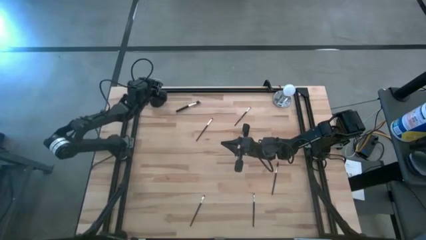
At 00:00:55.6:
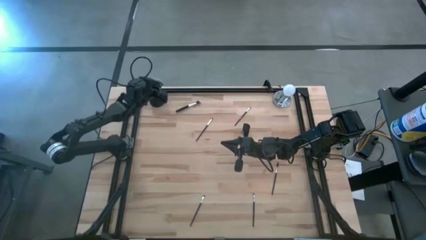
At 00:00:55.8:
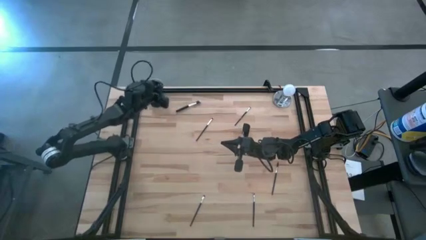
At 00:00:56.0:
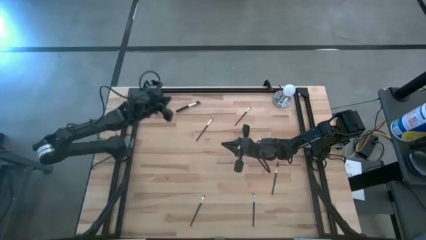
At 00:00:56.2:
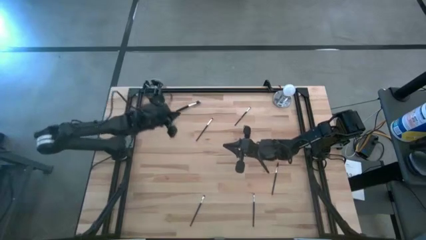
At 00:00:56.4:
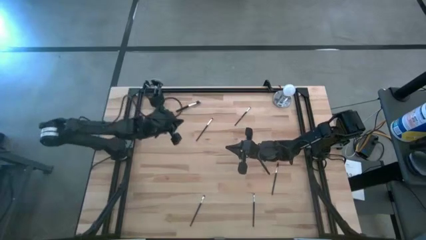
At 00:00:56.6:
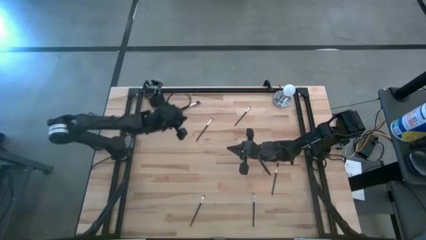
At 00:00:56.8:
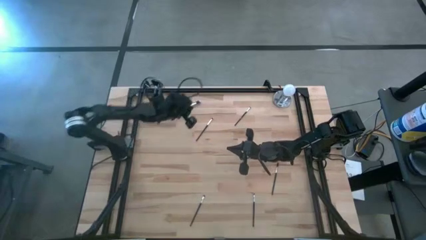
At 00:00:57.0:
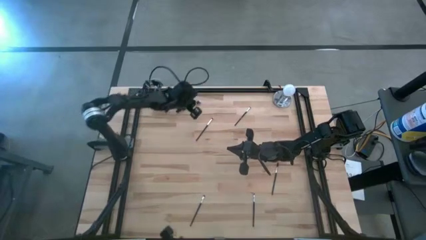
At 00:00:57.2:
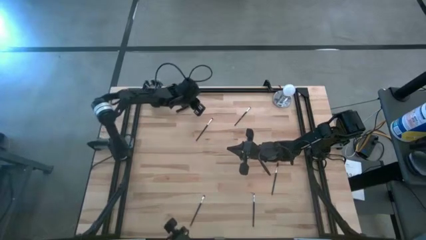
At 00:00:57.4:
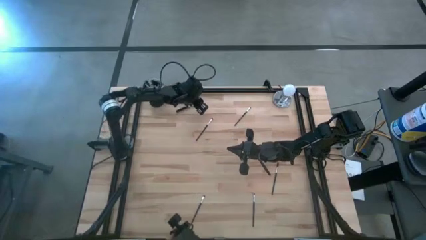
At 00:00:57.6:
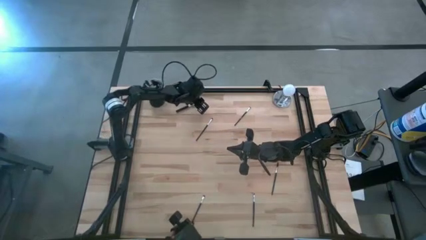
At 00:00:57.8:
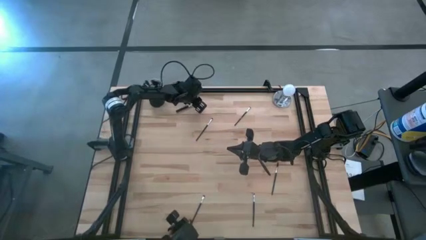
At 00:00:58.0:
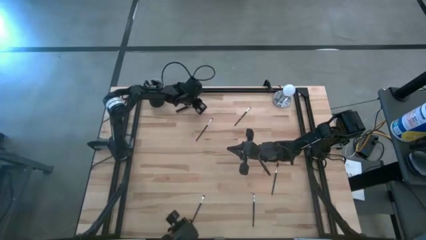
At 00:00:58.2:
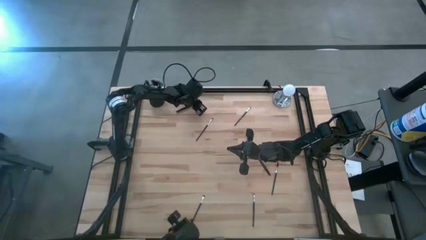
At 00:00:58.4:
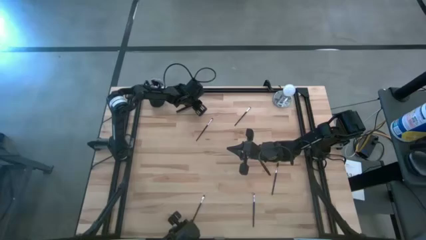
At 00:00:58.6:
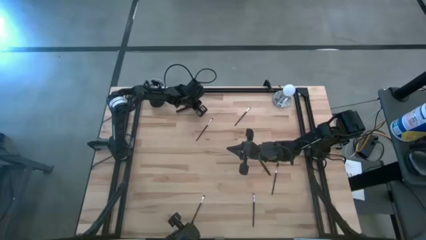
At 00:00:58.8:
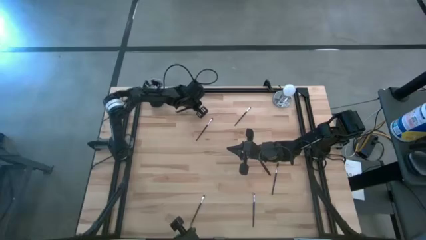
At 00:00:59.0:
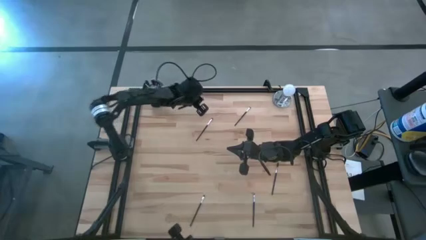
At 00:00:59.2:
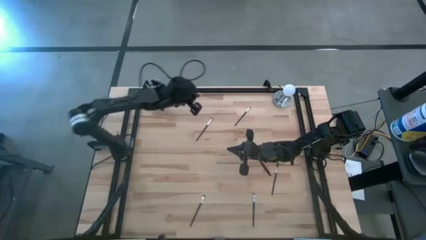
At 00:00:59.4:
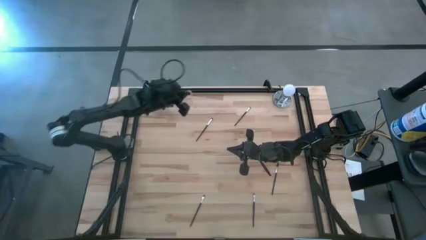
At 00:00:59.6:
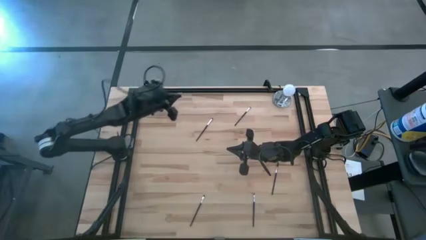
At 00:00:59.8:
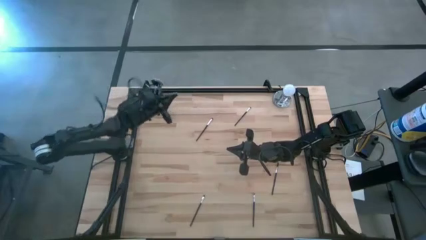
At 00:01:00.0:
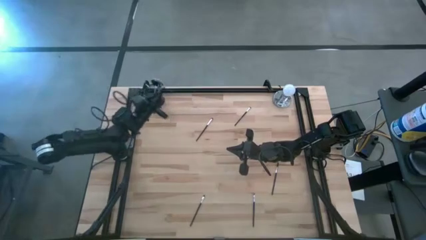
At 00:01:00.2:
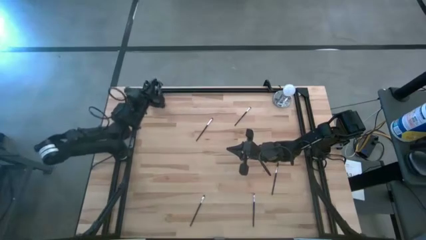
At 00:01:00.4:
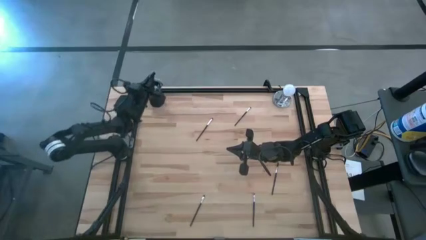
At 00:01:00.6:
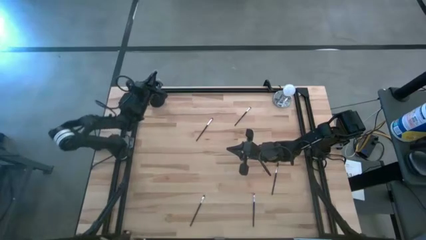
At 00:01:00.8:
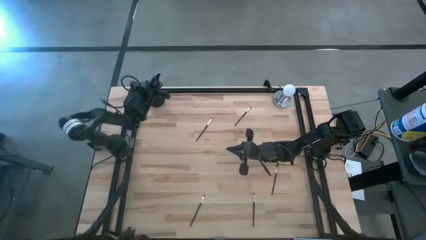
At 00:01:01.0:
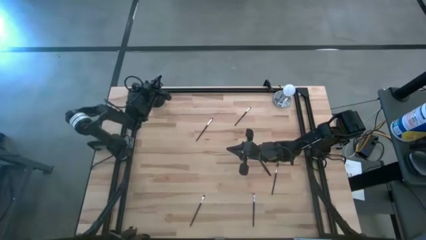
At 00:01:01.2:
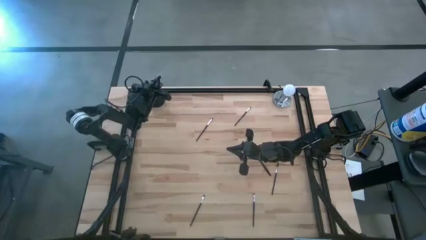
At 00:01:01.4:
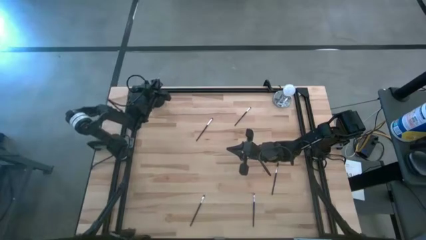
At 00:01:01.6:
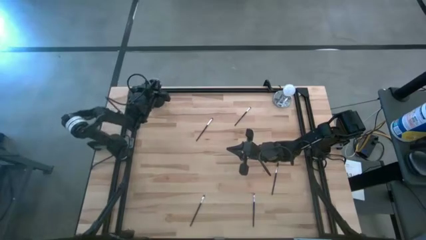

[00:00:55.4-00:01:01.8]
Task: Pick & Place Makeup Supplies
Put the makeup brush into the makeup holder

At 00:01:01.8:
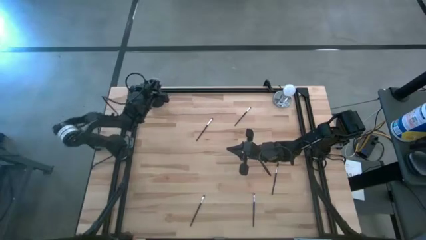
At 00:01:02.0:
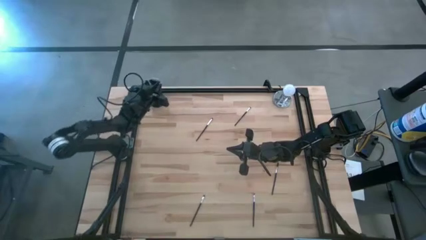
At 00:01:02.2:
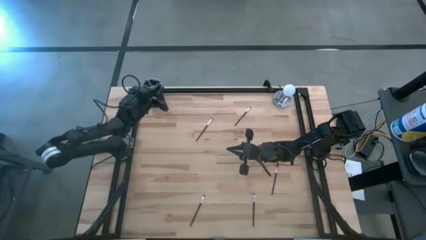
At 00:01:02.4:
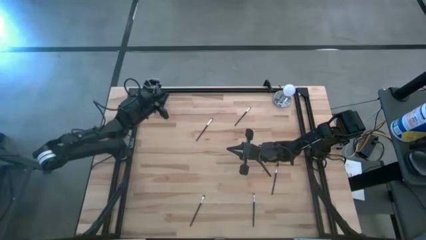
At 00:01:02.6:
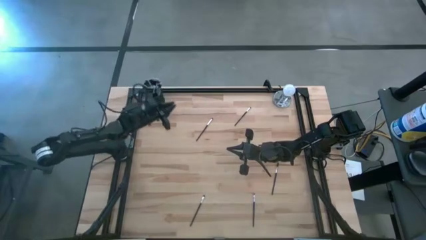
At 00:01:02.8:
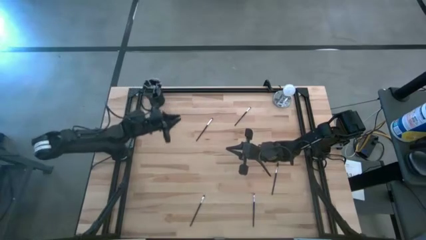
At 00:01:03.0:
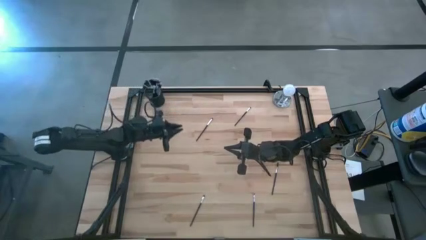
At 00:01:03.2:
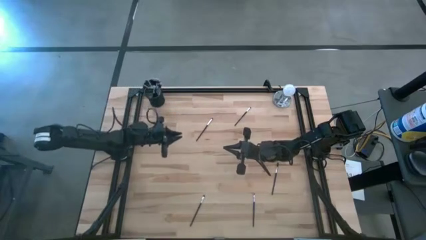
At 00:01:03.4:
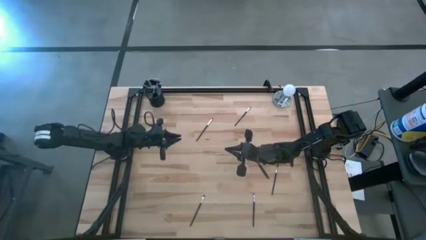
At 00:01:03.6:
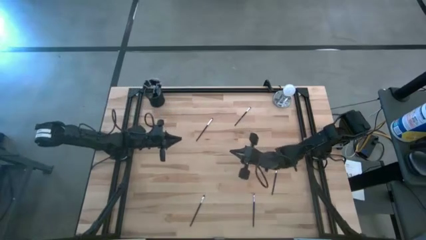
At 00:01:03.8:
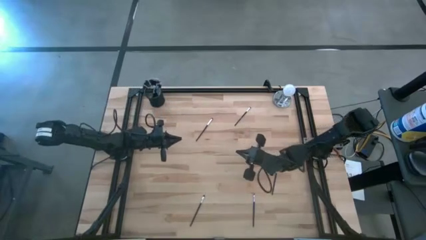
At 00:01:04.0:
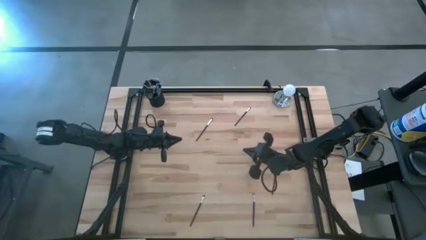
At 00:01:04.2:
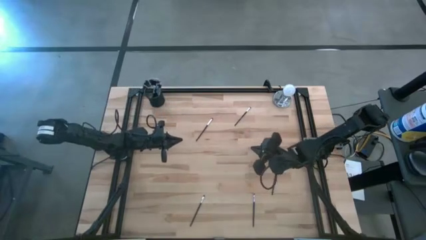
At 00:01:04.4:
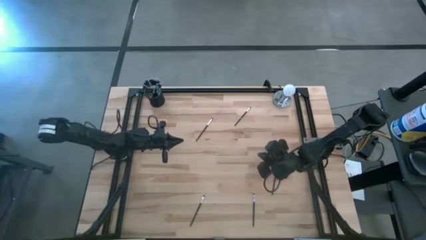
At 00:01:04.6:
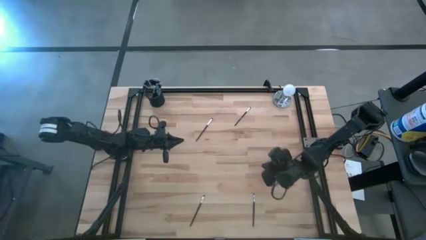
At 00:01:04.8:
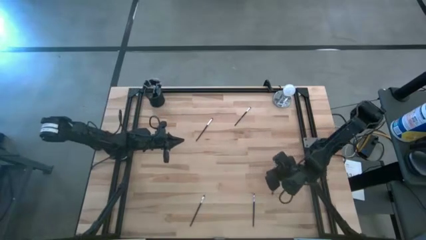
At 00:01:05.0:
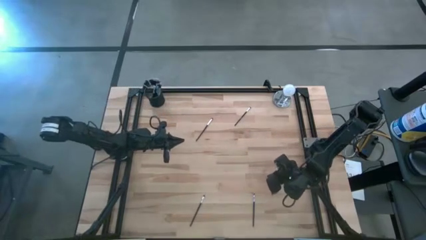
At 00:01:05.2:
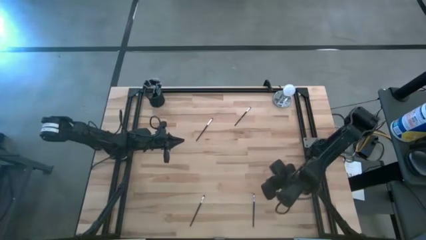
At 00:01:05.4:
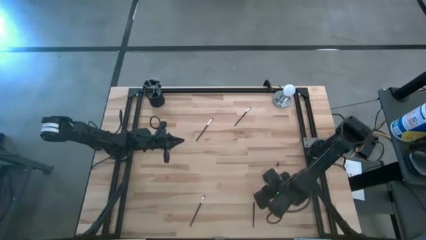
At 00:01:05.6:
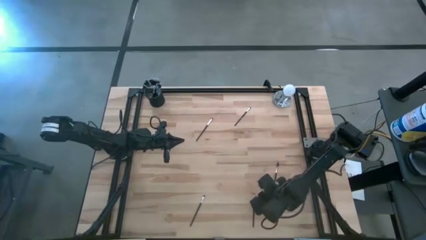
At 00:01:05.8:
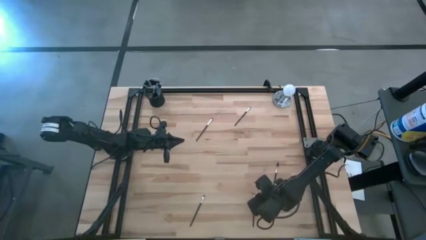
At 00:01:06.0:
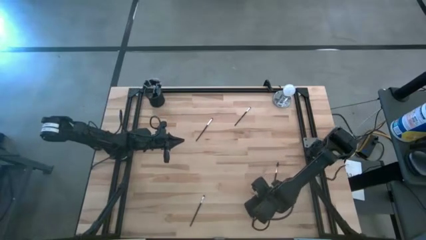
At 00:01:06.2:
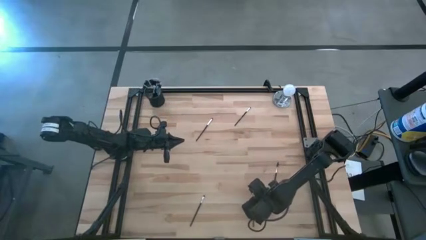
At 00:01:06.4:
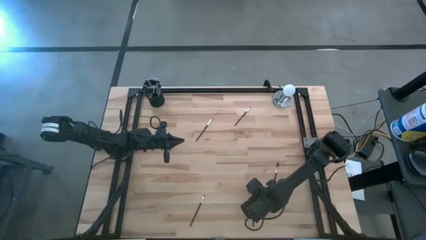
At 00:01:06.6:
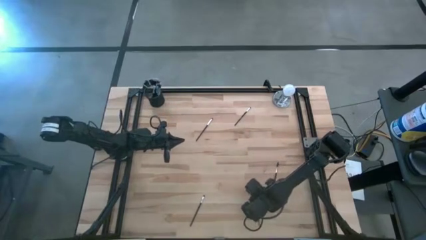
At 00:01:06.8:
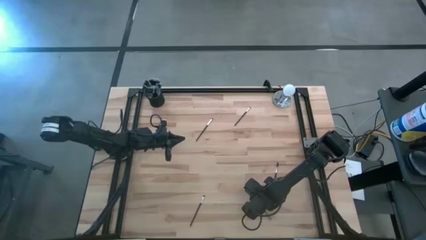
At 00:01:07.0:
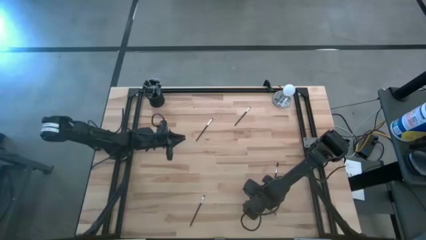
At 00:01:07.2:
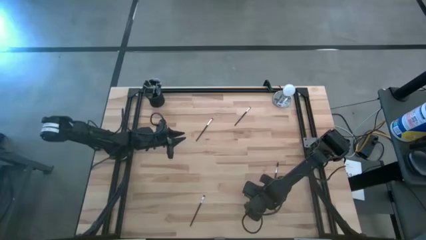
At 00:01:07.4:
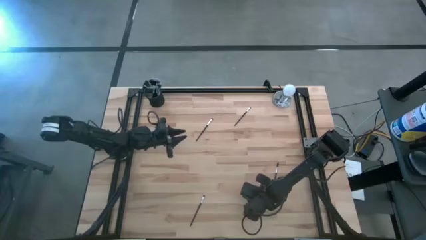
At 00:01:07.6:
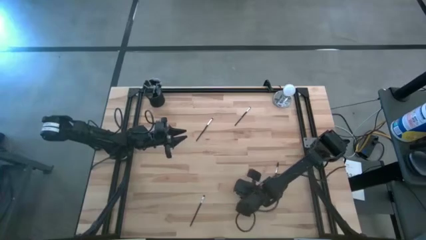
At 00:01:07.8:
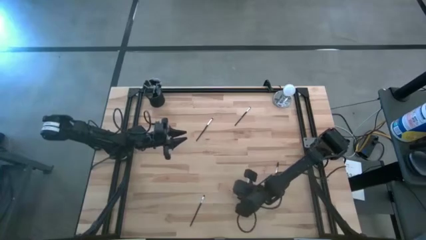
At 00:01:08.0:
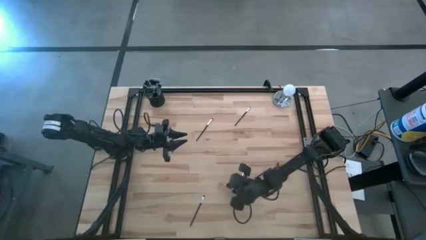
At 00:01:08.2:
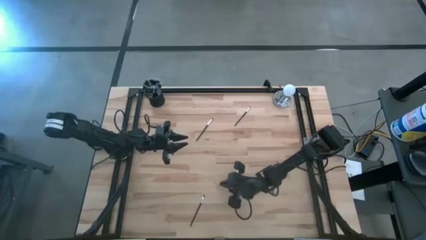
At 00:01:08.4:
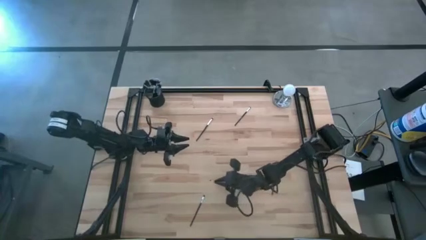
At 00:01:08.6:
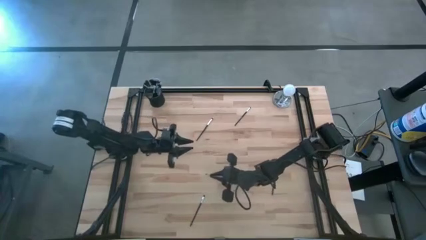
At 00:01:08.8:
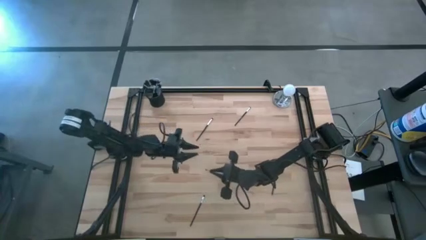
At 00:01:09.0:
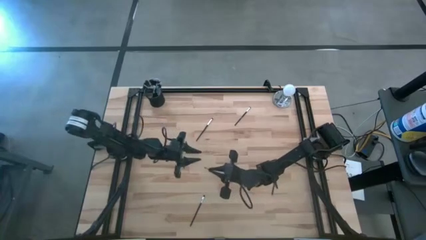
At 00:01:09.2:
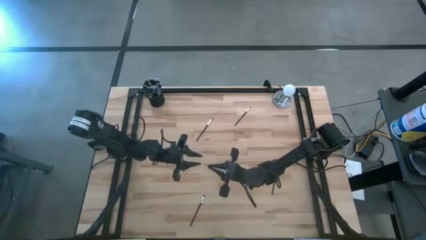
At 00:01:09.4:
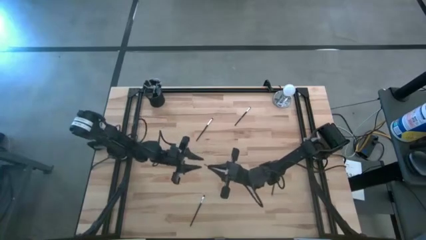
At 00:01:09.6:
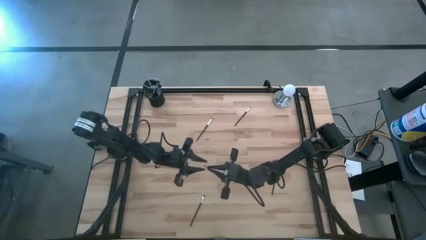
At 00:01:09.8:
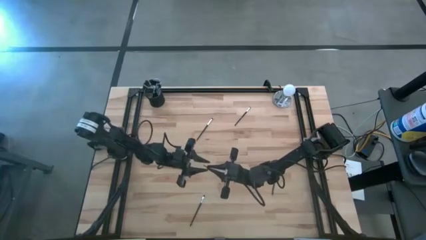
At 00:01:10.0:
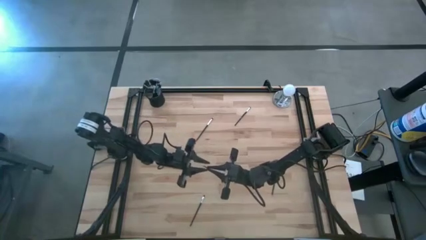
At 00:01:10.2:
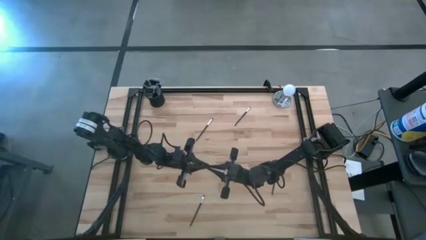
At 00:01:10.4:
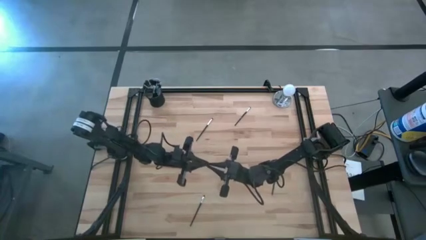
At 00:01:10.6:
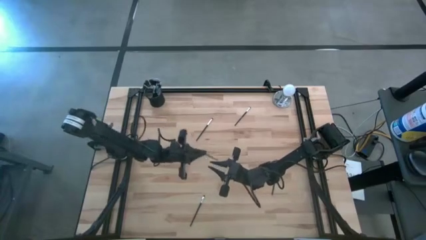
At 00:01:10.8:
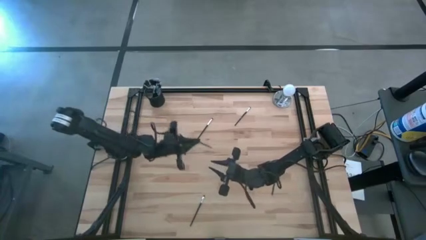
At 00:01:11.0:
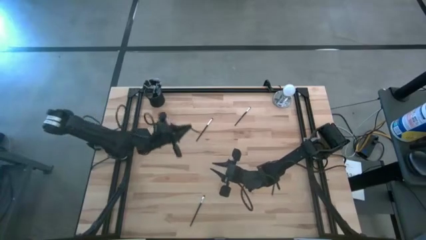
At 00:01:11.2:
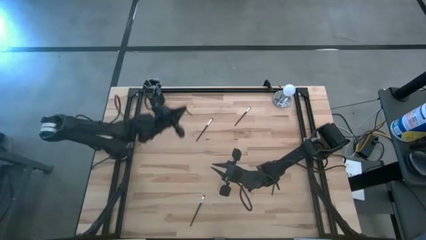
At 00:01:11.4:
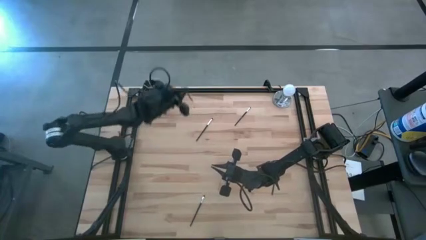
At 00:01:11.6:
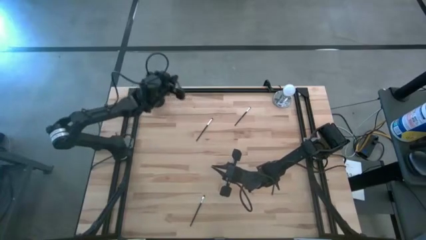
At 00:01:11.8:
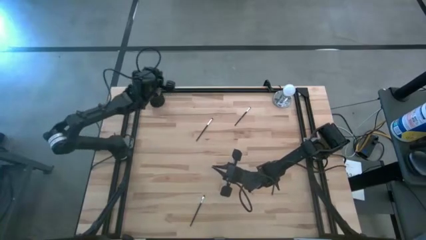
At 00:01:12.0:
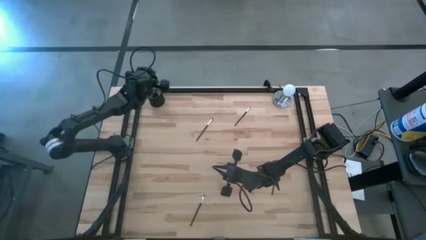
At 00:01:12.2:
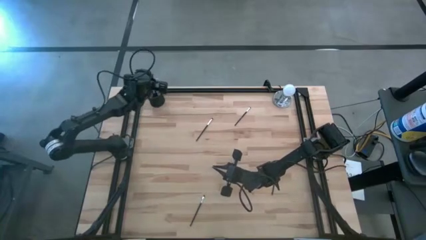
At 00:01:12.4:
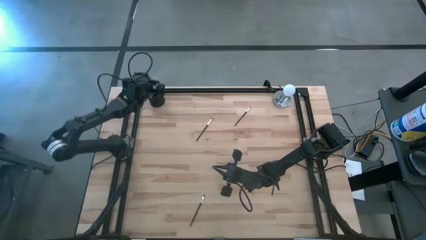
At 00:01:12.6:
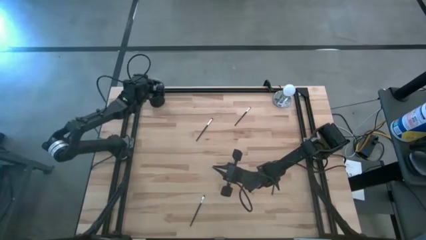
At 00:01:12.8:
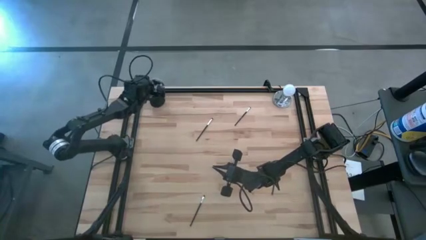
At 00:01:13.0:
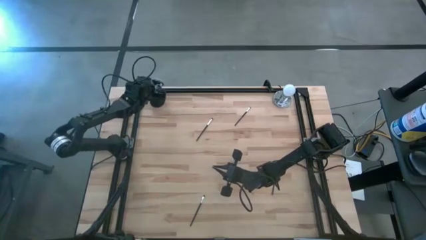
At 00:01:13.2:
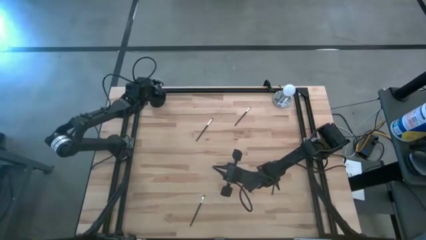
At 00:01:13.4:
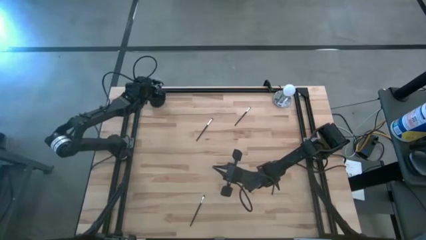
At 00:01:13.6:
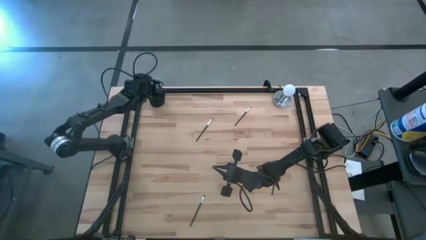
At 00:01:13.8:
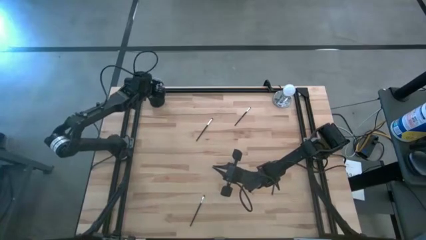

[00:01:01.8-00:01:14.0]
Put the makeup brush into the makeup holder
